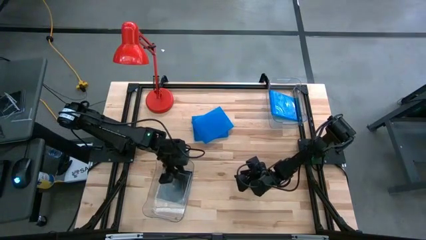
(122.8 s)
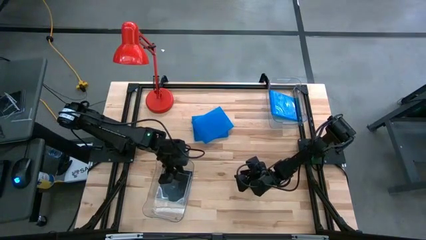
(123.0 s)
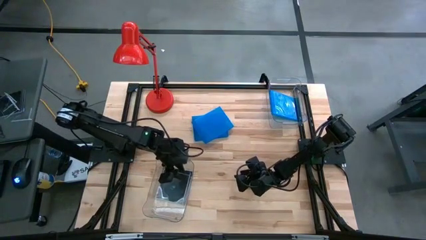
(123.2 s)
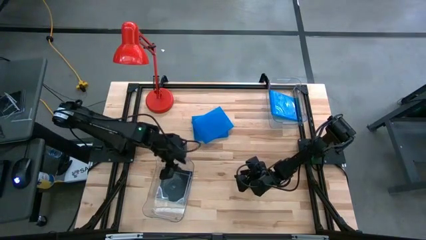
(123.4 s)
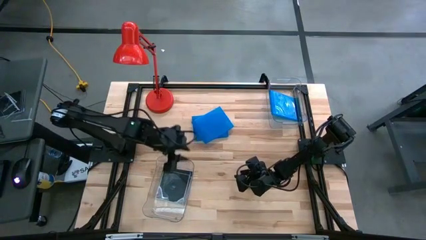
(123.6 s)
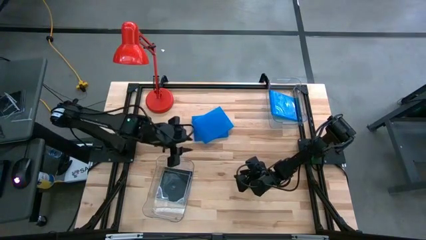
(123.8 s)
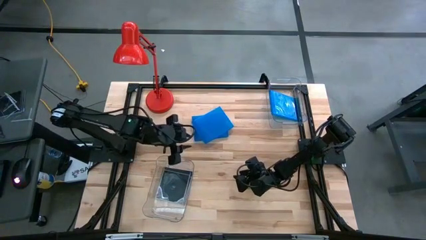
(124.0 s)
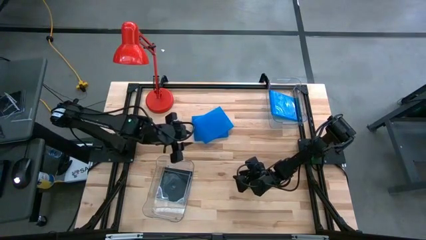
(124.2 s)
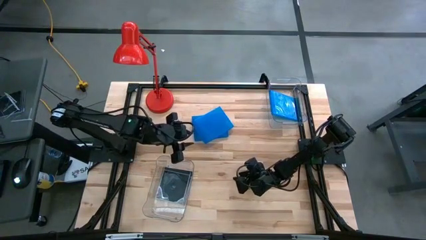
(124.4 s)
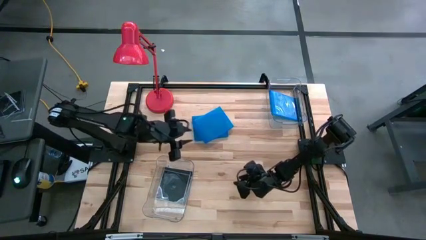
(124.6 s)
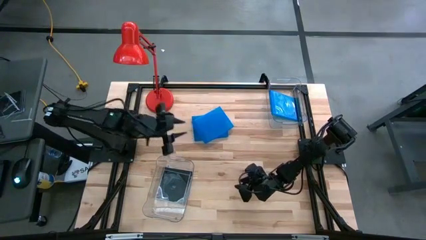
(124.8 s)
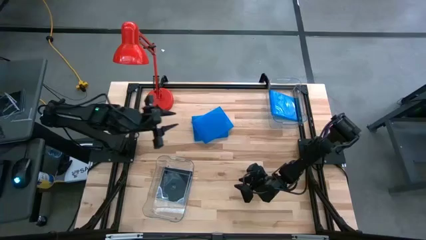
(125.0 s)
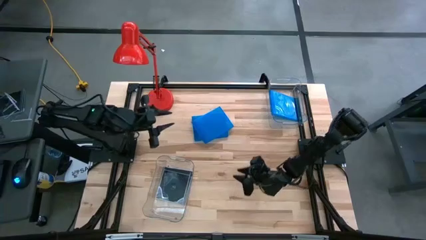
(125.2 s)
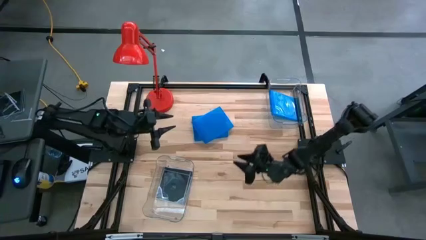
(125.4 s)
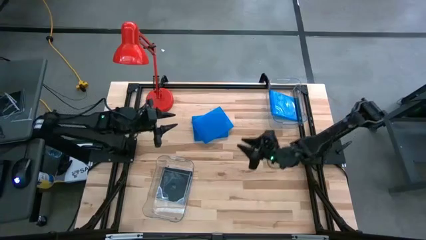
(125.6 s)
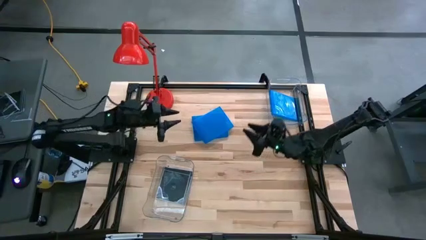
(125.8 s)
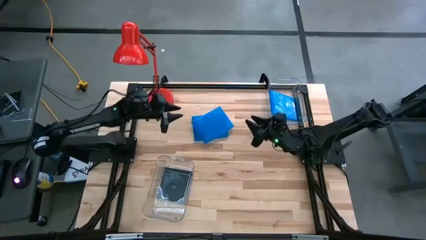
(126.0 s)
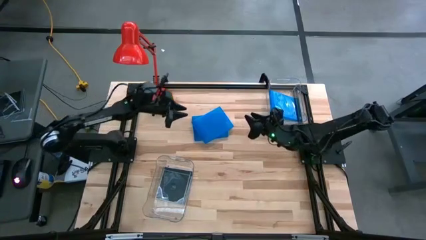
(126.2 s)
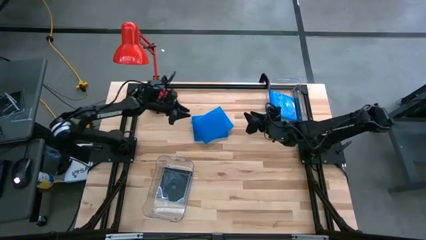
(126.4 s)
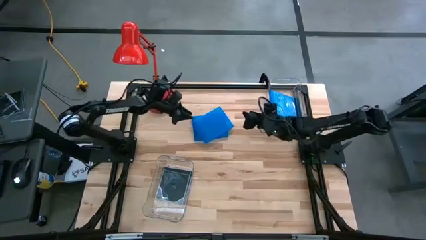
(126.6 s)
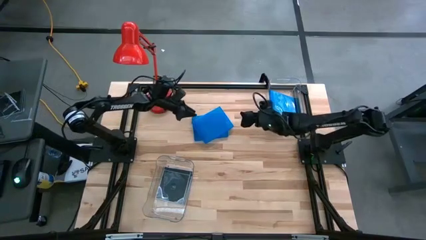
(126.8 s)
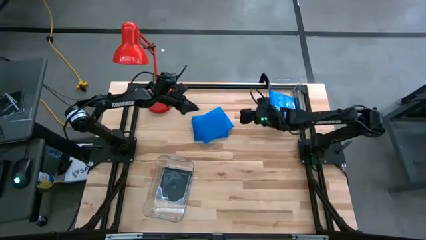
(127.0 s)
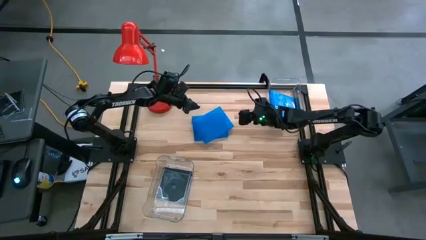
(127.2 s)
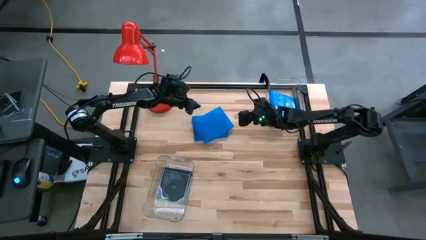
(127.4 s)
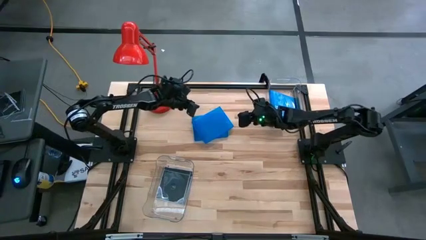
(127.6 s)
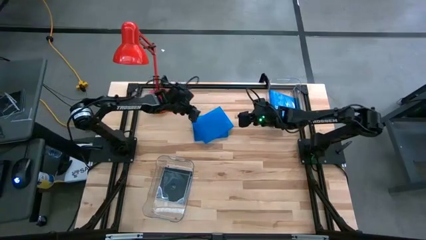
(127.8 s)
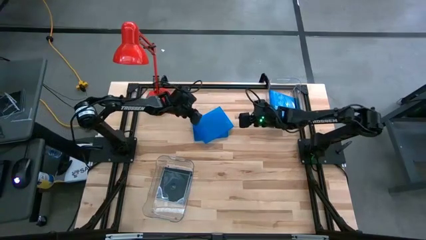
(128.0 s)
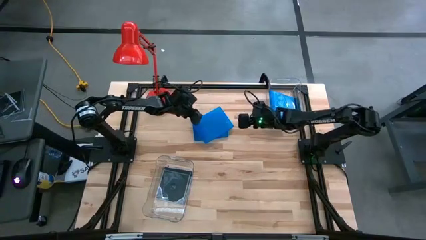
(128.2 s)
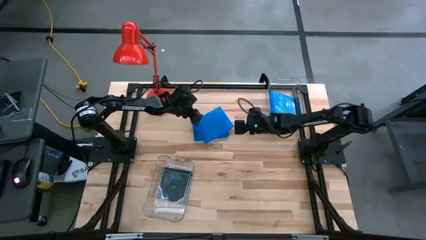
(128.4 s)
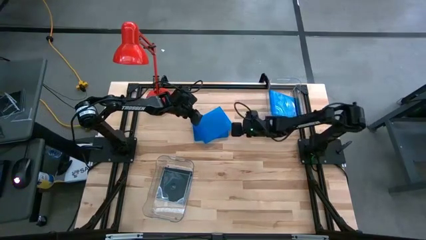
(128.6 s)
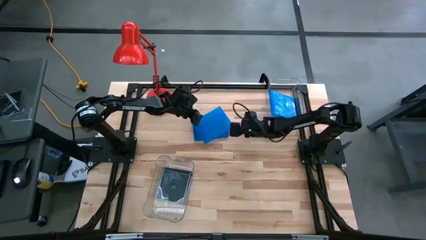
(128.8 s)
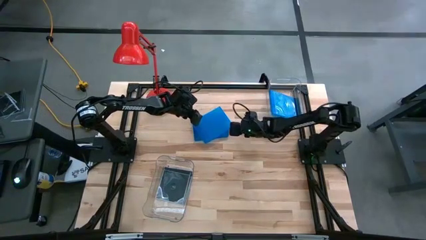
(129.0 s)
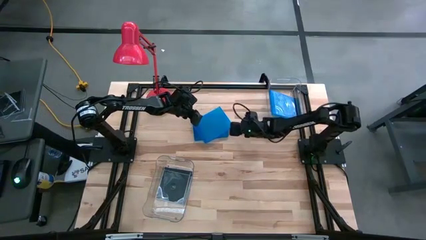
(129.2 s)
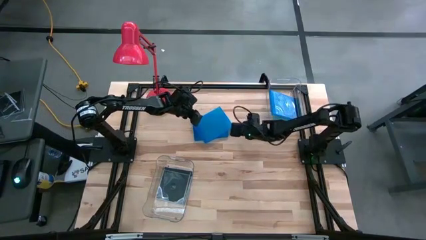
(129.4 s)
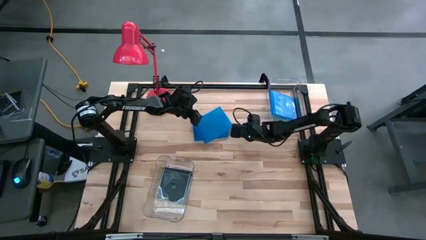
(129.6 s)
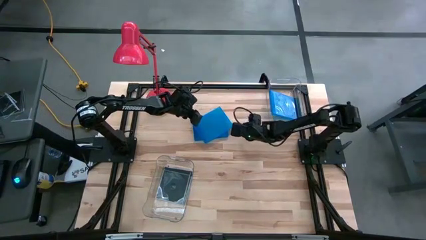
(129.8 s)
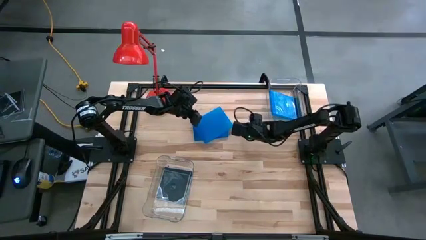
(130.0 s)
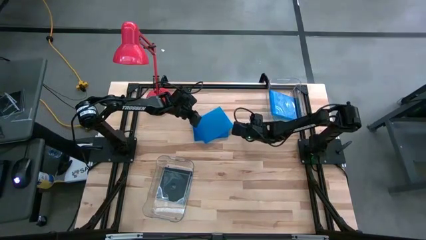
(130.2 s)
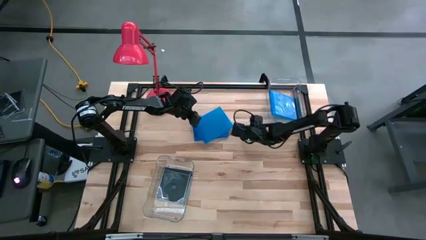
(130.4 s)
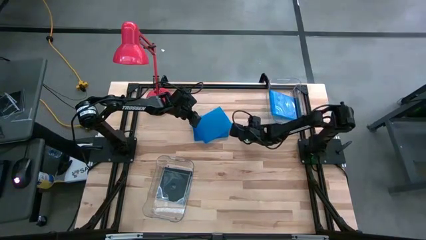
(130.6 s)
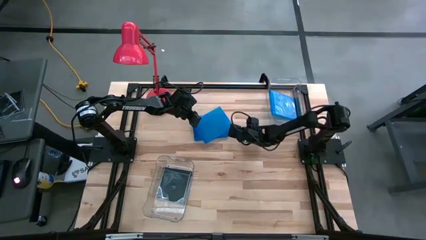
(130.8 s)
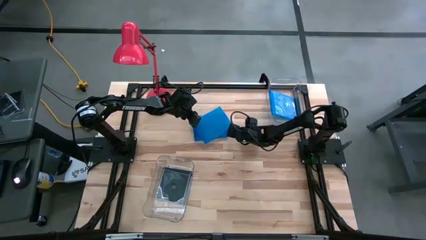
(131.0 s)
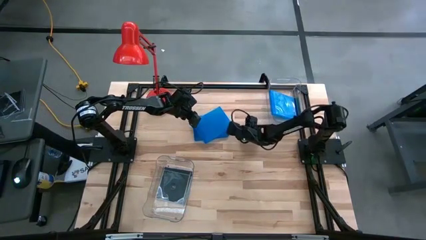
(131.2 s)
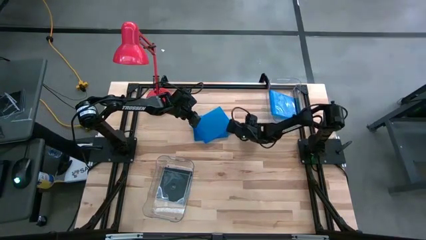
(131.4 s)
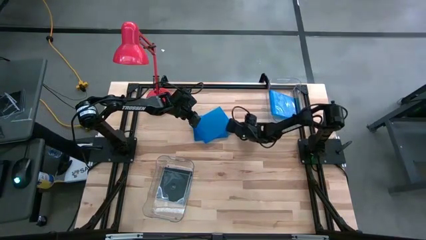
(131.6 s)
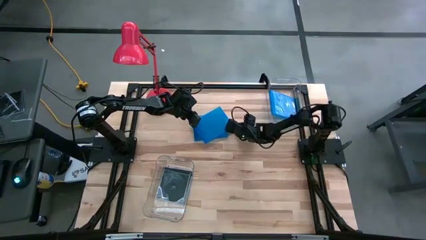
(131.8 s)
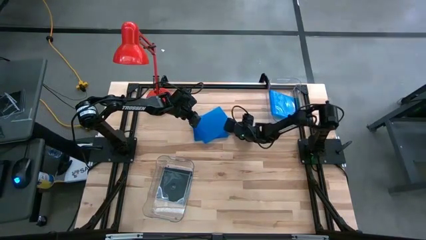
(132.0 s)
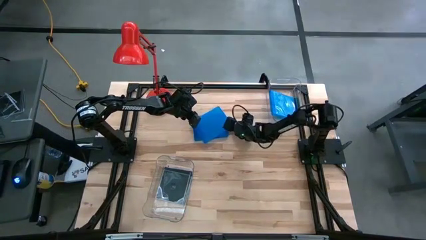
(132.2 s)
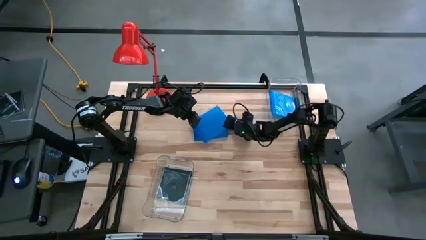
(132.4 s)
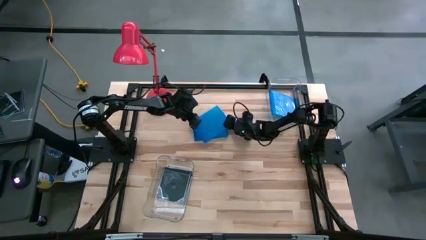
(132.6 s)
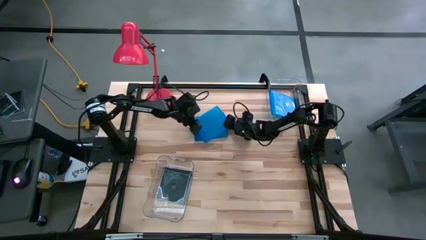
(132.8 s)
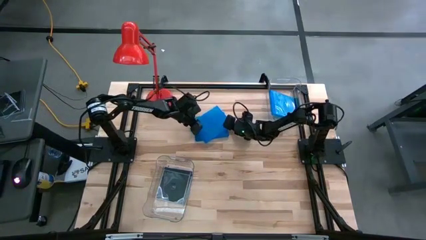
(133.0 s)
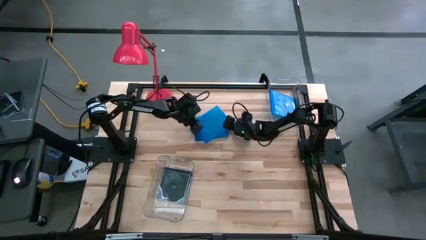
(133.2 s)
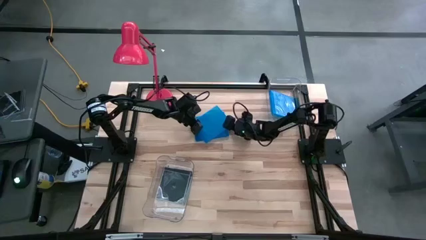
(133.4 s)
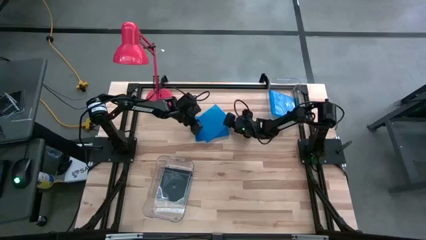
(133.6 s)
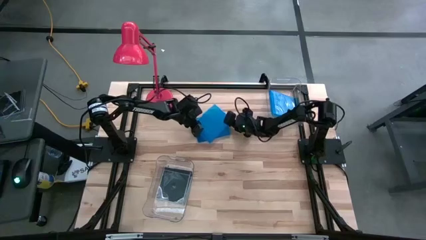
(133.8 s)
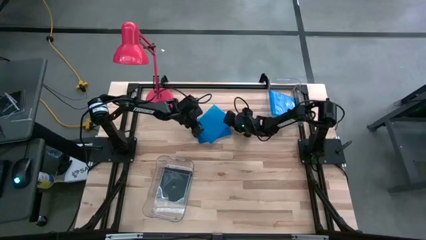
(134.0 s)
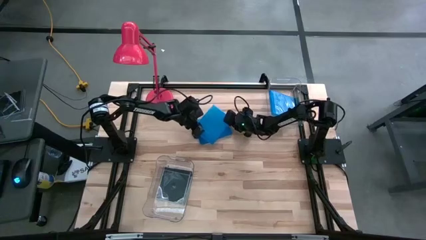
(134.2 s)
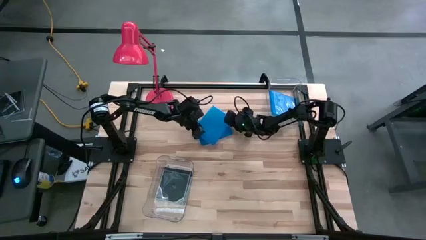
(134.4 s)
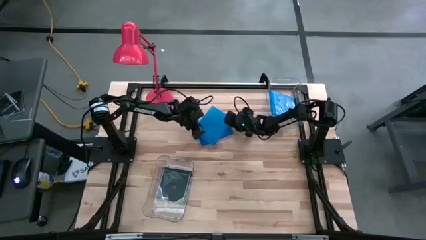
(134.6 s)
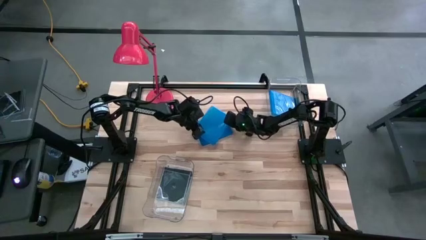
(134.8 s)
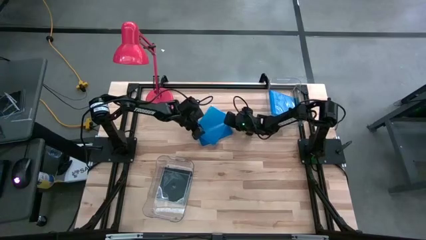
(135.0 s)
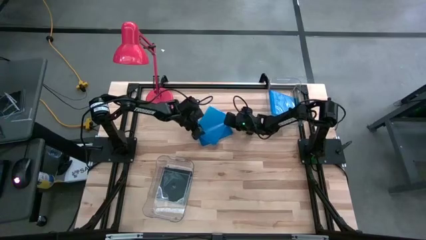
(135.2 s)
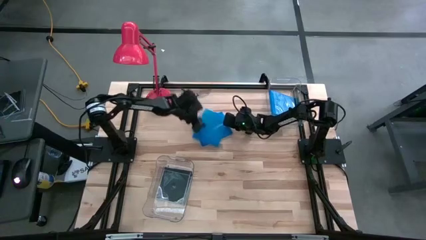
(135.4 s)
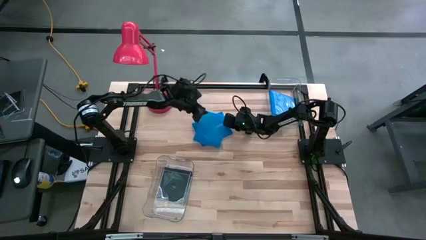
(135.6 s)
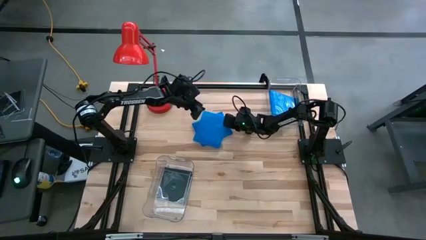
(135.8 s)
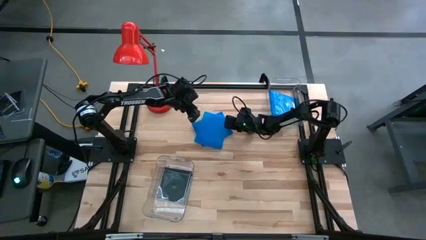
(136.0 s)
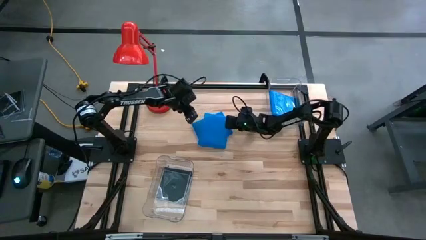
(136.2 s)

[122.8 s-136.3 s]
Task: Pick & place jewel cases by type
Put the blue cd case into the top transparent bin
